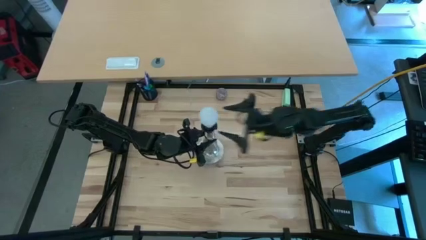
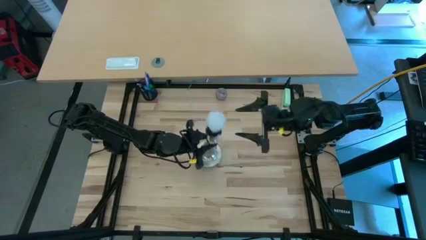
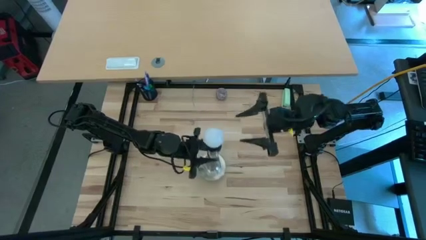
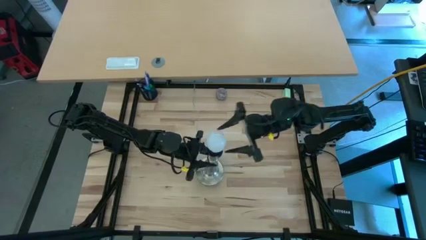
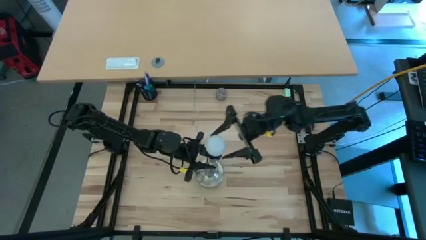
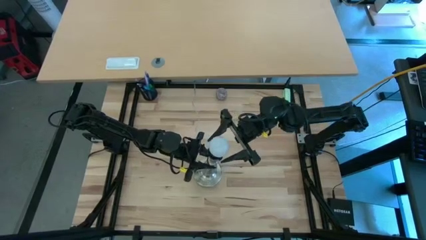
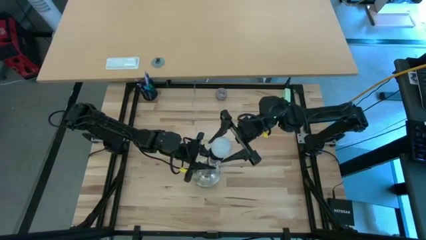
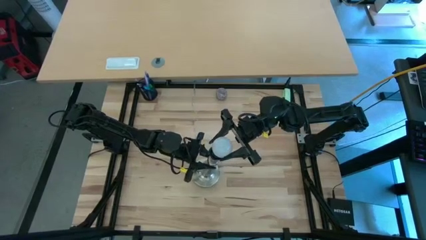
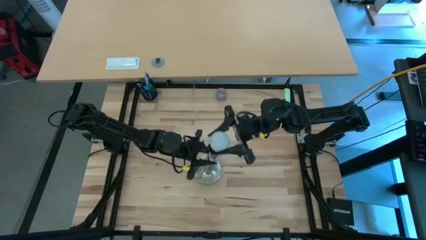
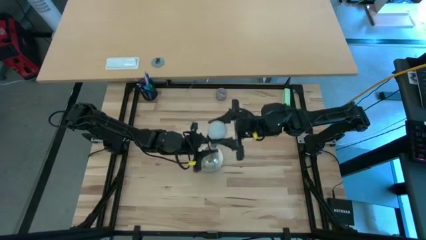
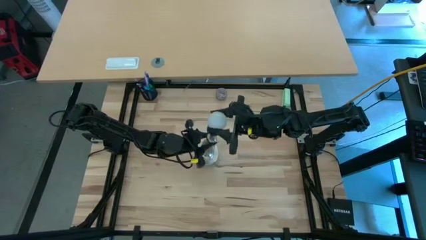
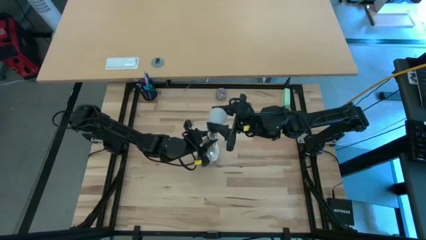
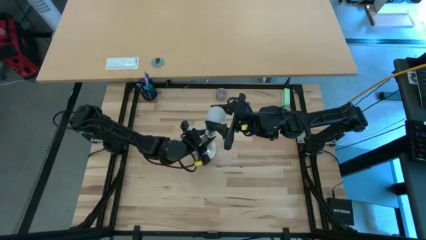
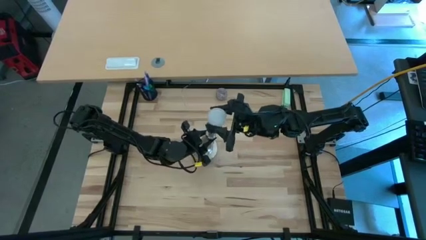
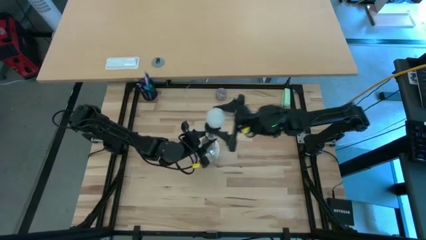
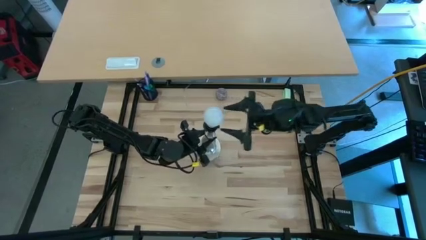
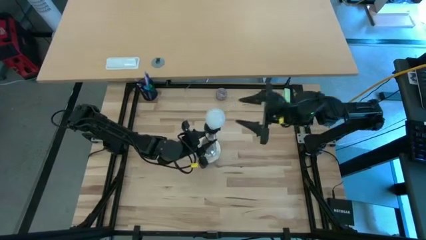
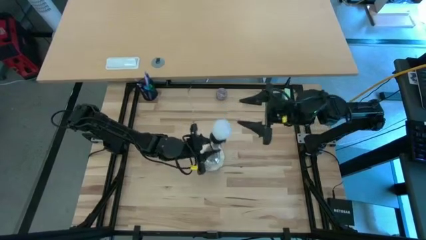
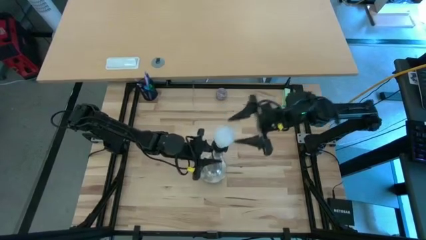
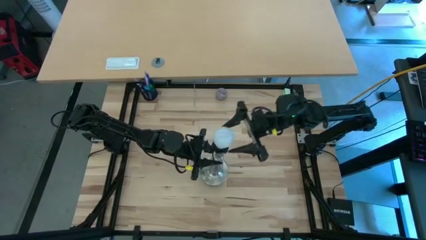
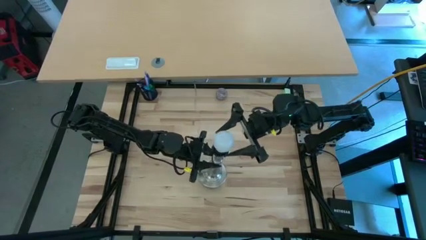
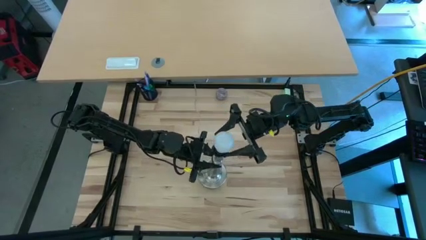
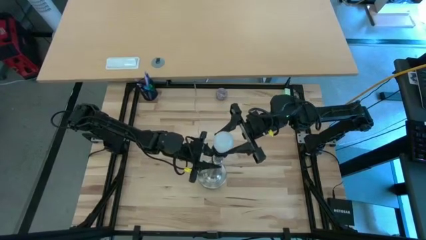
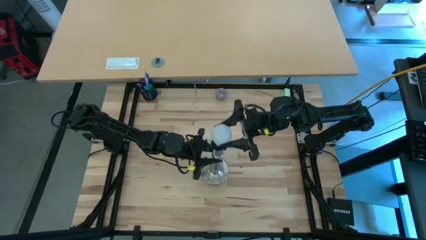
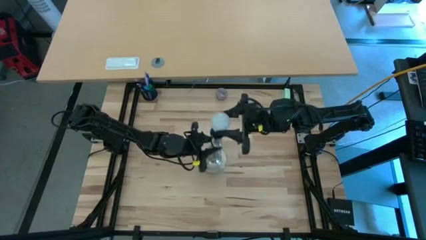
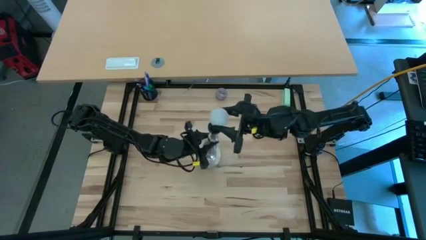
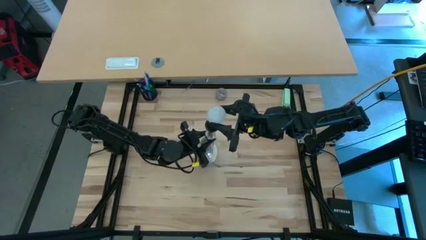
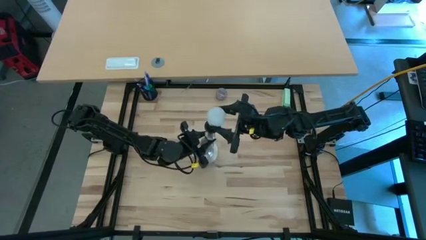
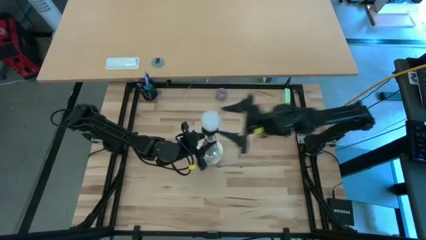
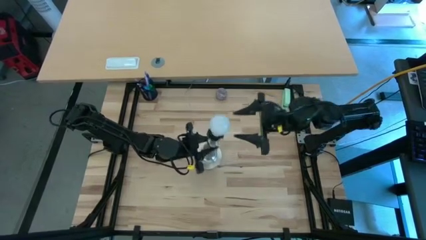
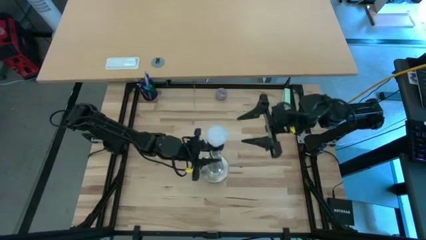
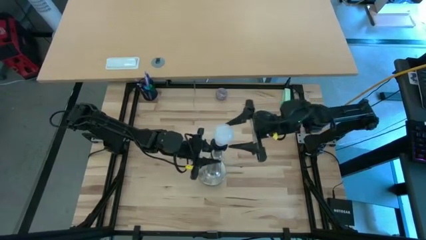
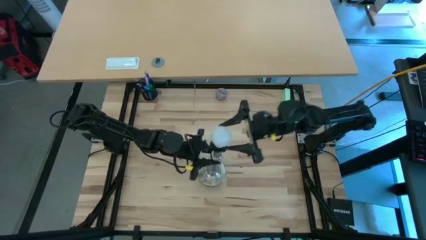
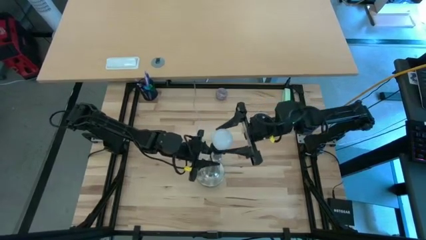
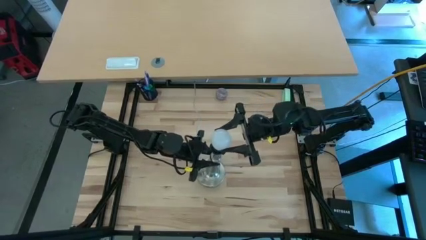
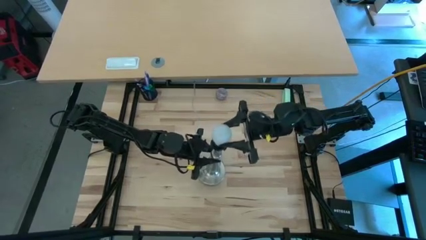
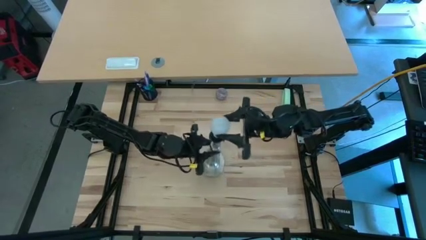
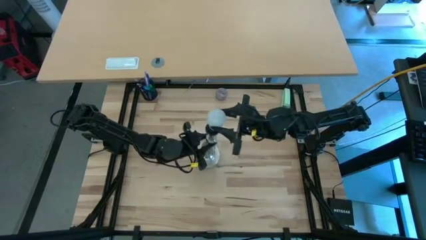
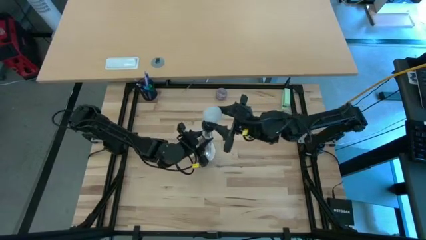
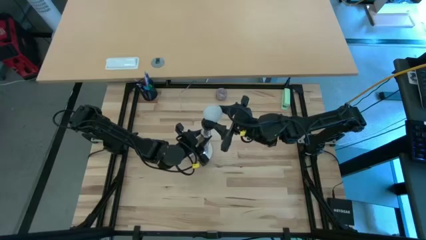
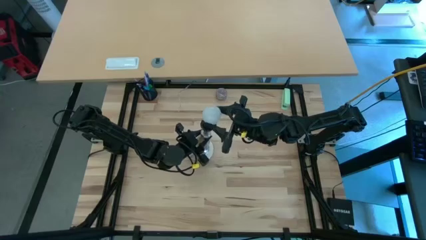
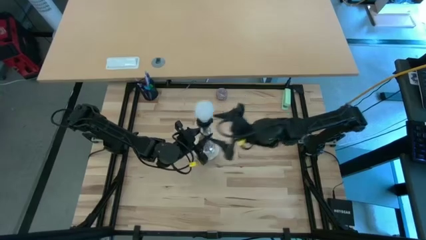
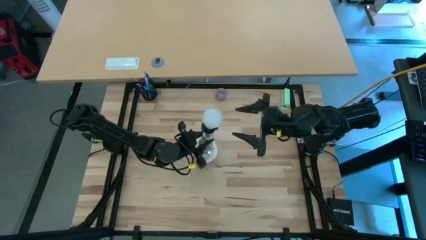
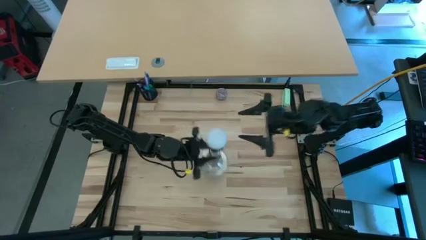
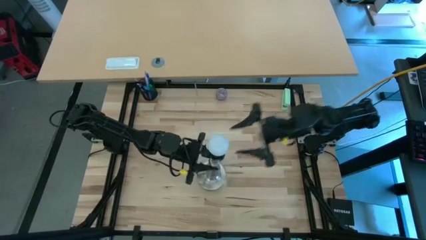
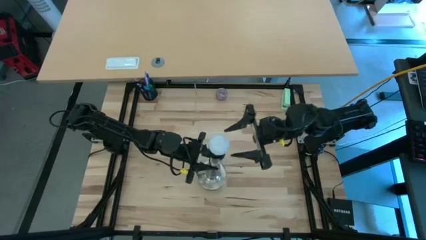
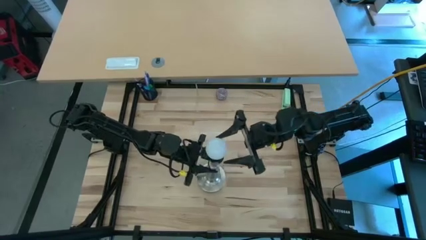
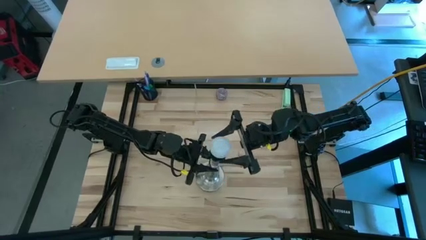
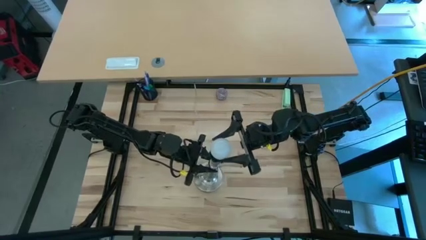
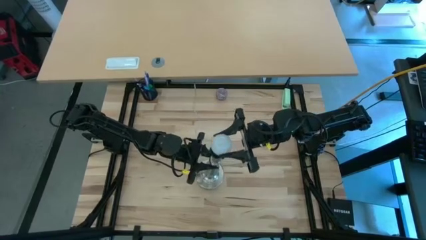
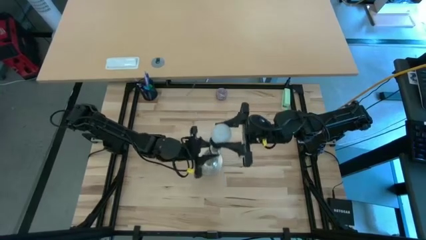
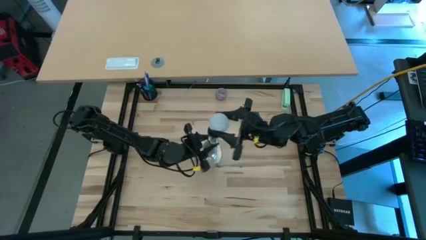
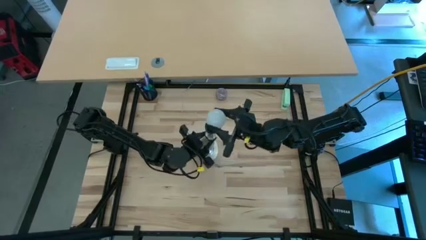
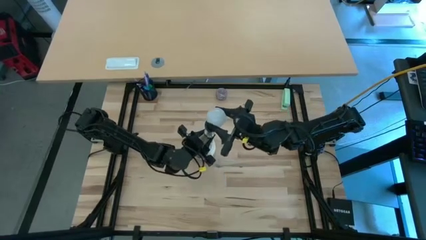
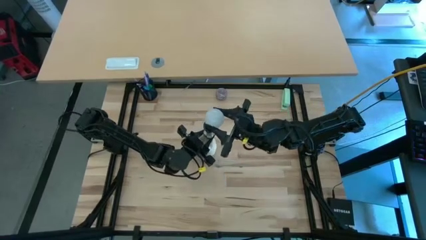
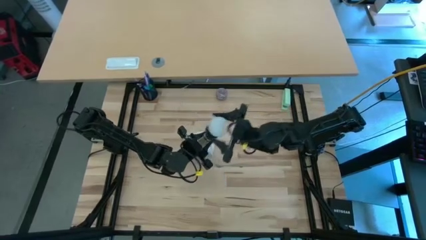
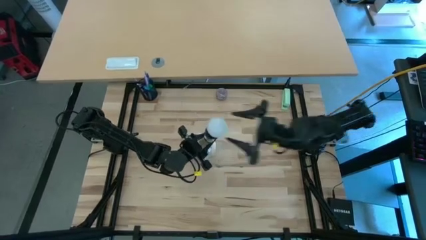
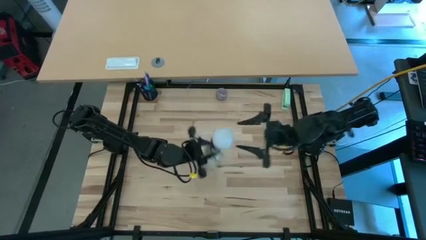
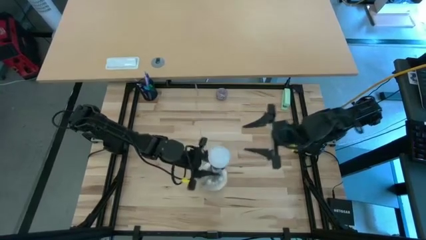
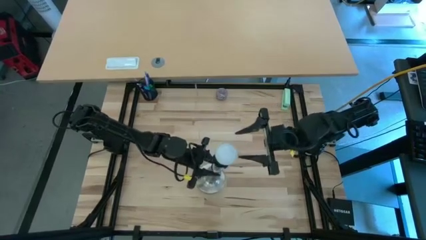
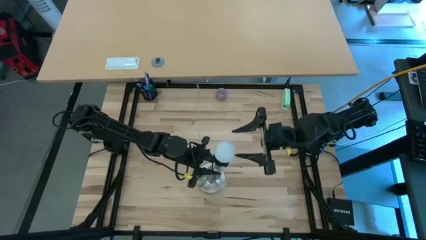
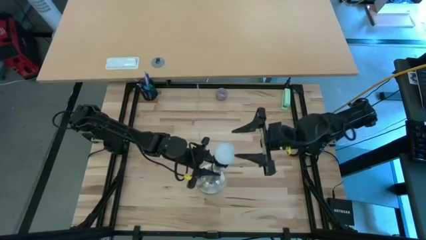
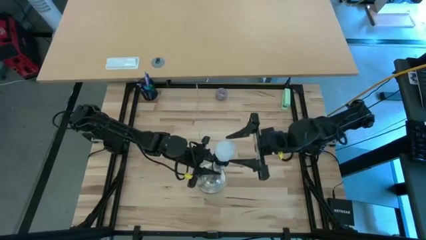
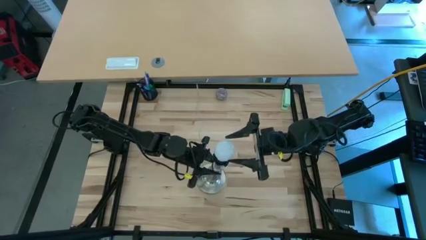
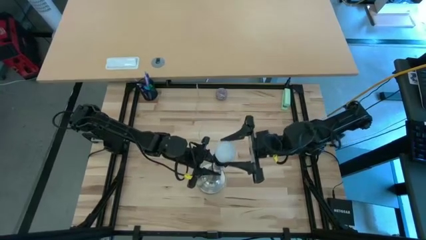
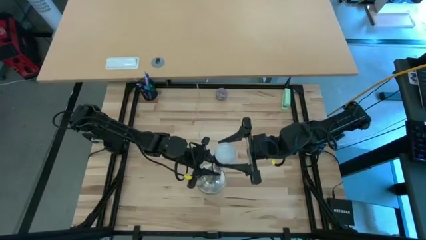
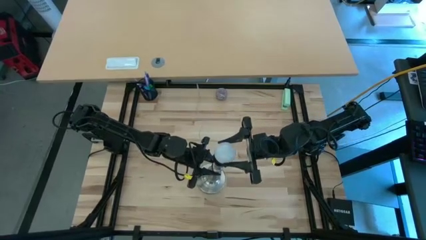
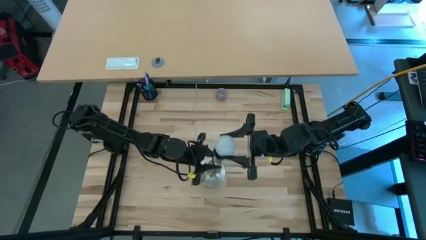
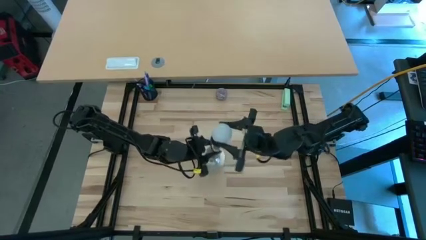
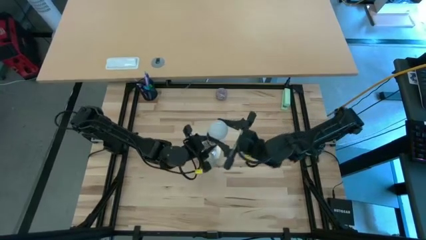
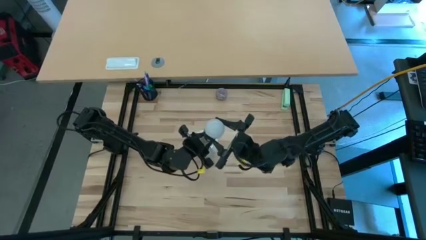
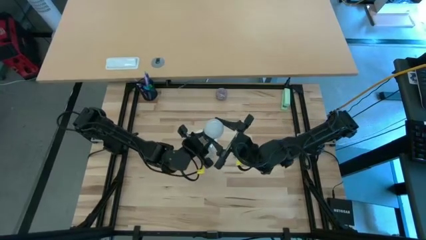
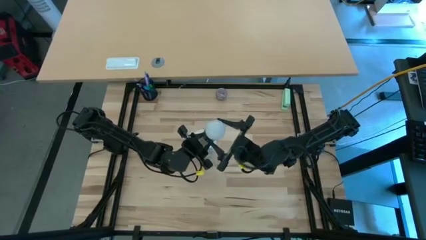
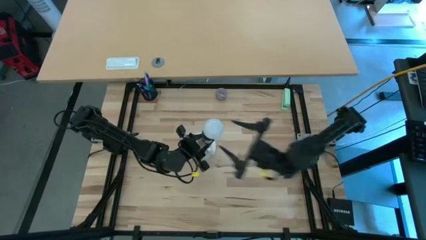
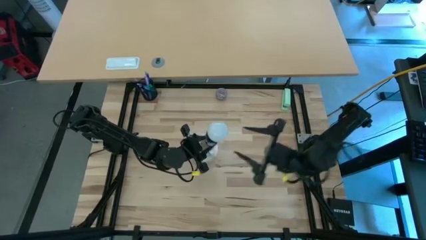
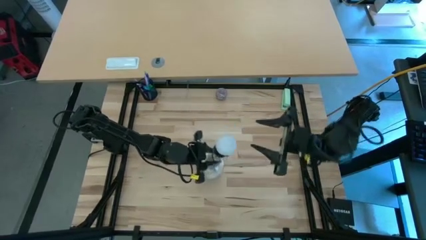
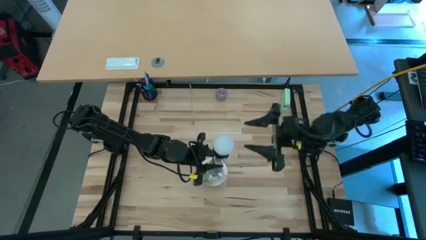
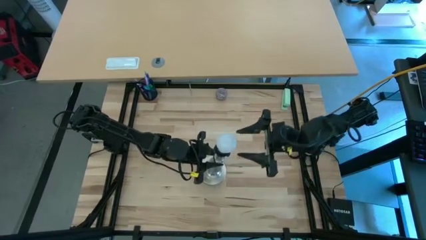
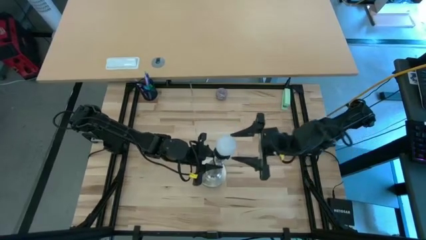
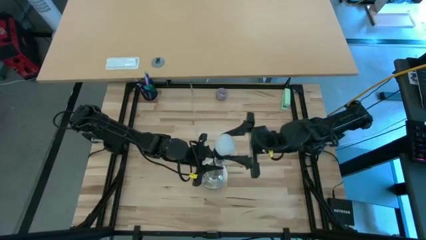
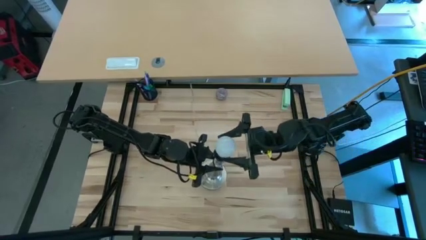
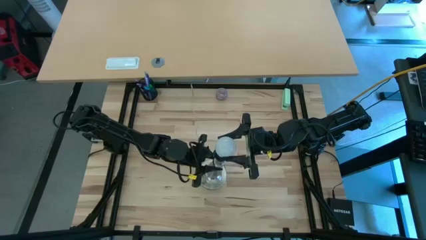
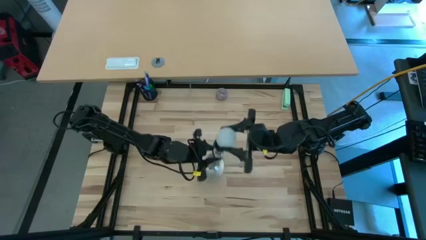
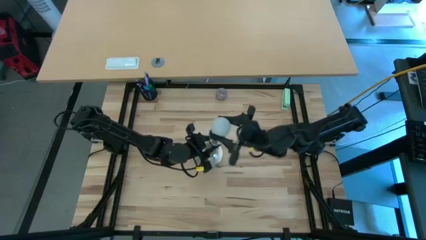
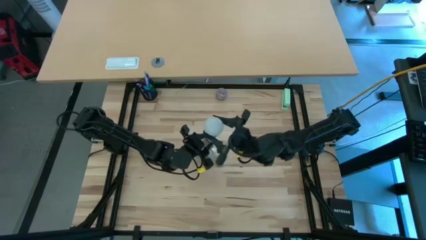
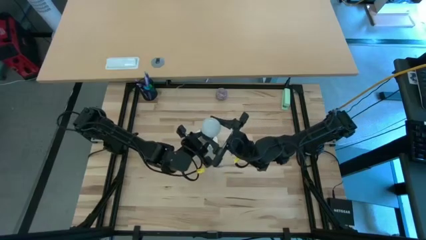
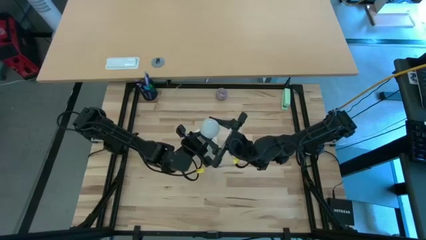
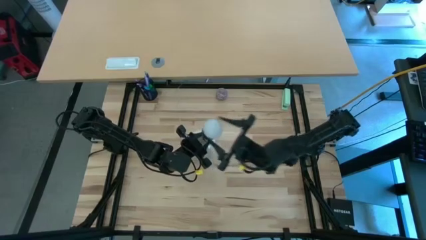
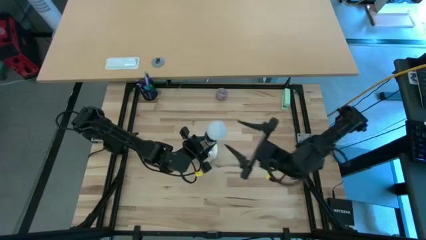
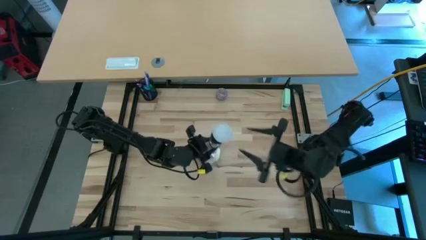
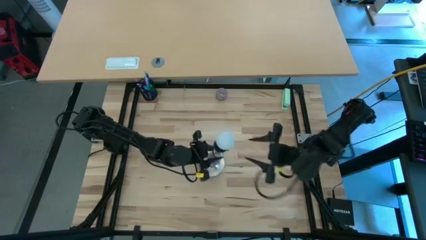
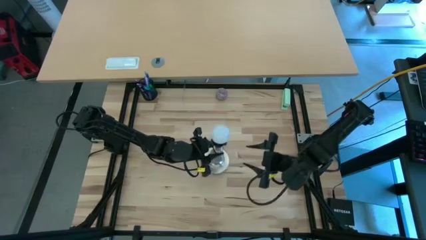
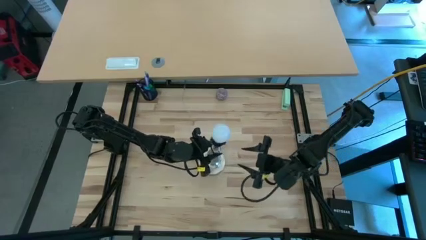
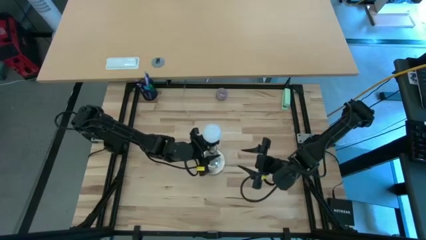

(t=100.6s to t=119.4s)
Task: Screw lightbulb
Insert the lightbulb into the silver lamp
